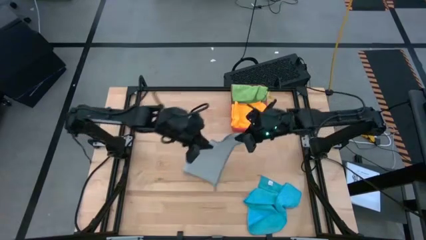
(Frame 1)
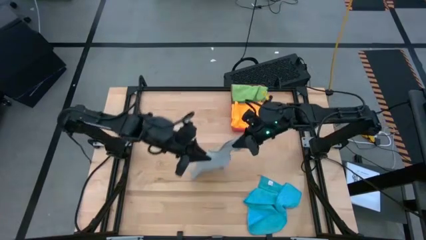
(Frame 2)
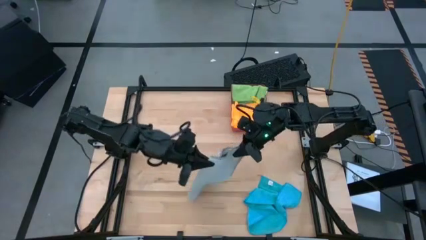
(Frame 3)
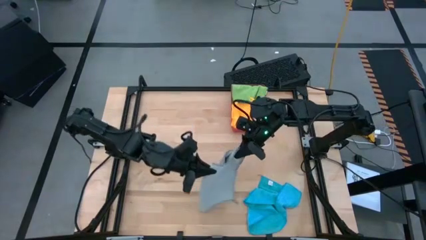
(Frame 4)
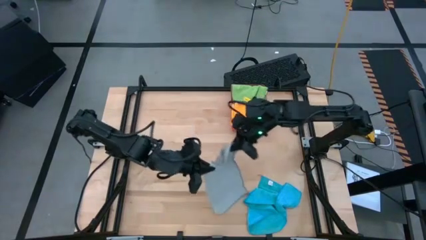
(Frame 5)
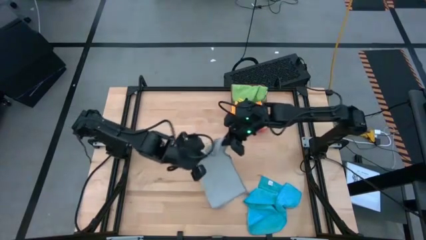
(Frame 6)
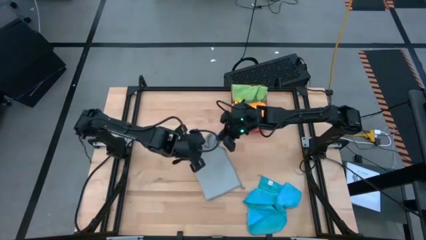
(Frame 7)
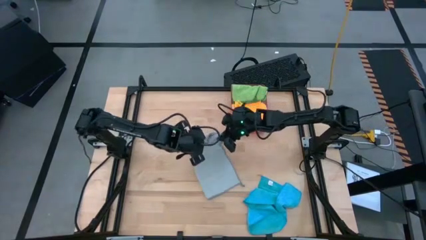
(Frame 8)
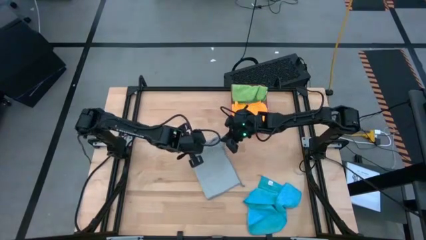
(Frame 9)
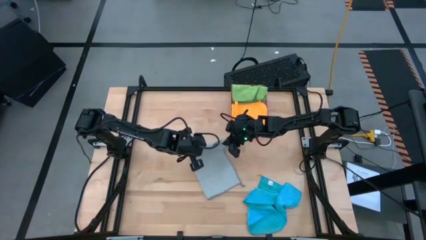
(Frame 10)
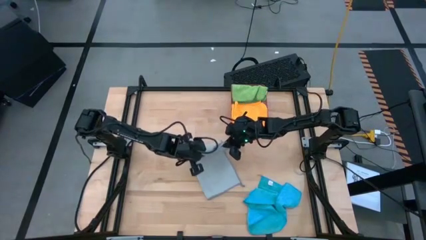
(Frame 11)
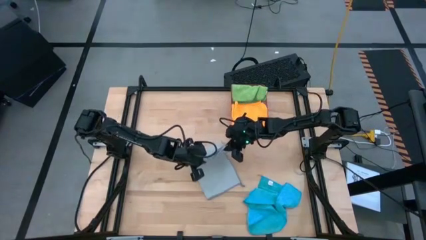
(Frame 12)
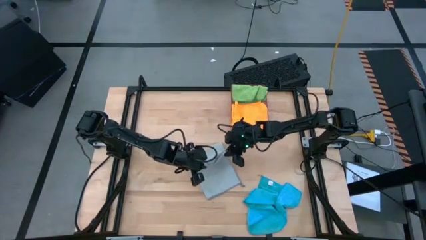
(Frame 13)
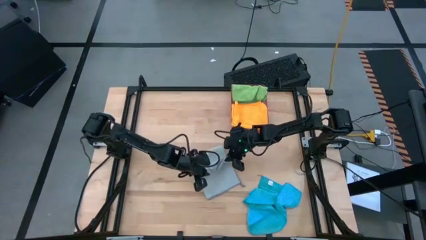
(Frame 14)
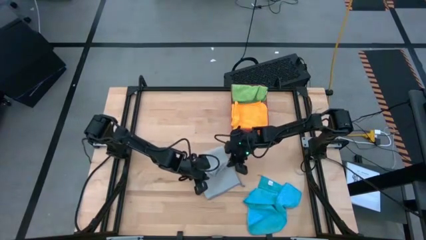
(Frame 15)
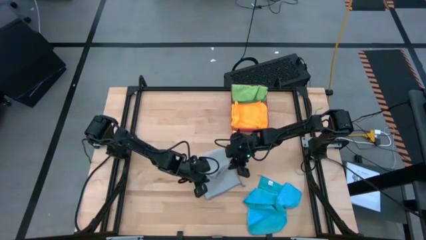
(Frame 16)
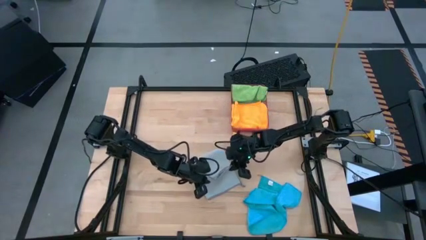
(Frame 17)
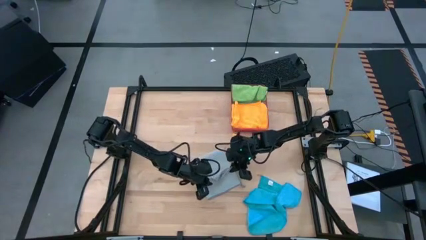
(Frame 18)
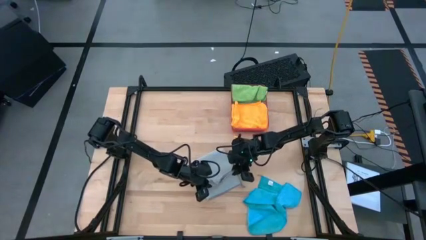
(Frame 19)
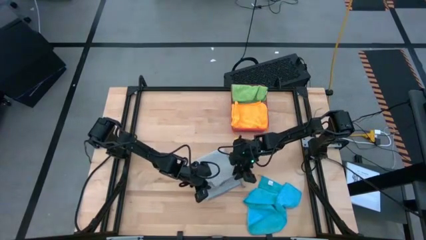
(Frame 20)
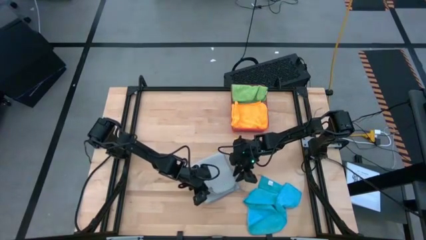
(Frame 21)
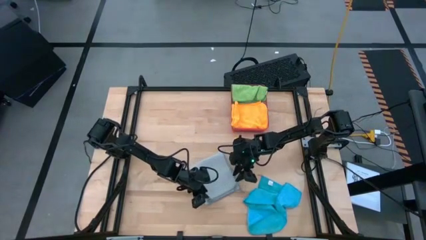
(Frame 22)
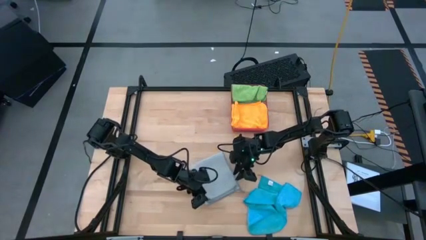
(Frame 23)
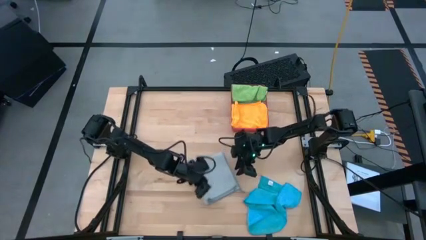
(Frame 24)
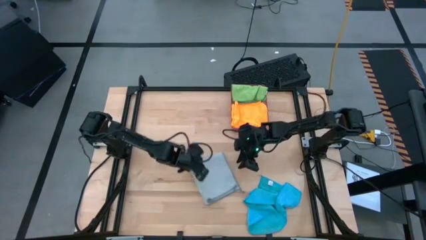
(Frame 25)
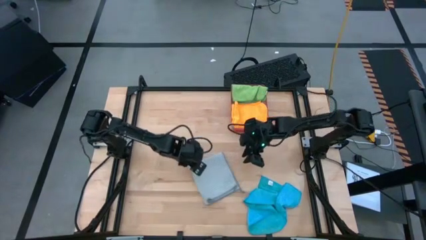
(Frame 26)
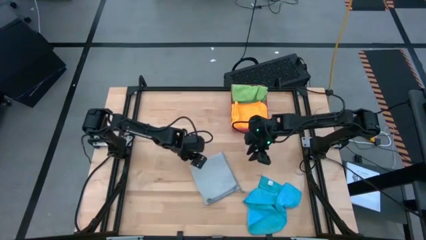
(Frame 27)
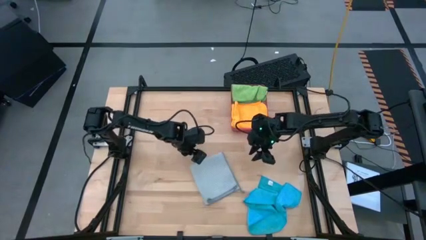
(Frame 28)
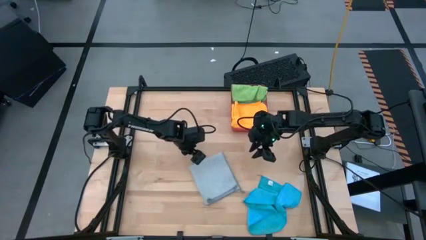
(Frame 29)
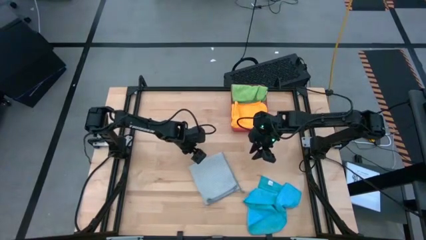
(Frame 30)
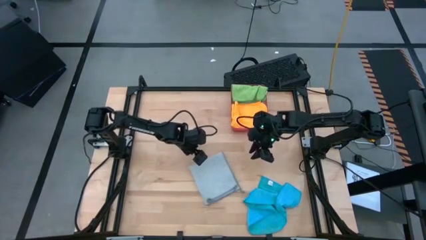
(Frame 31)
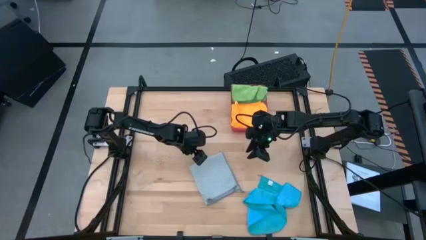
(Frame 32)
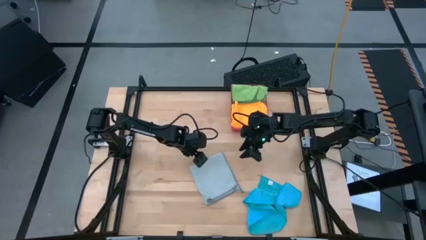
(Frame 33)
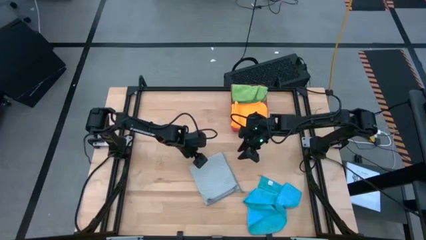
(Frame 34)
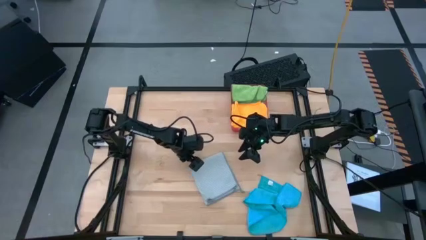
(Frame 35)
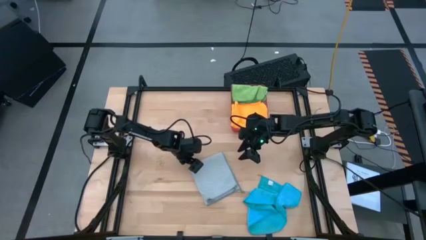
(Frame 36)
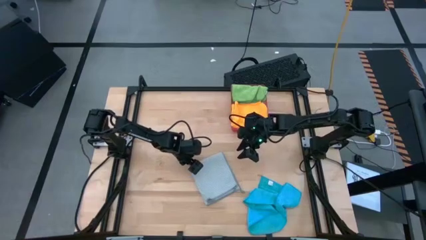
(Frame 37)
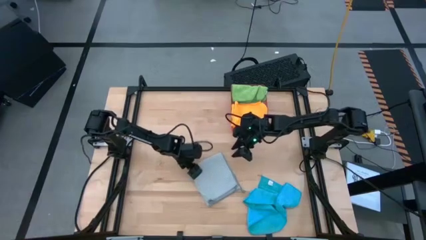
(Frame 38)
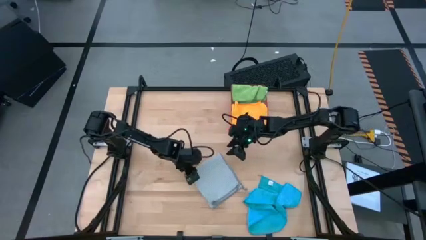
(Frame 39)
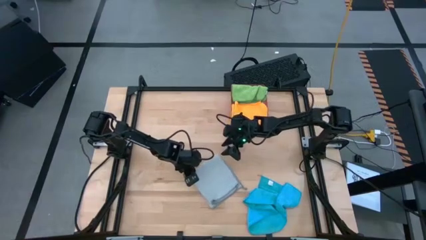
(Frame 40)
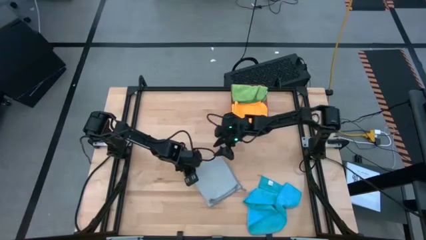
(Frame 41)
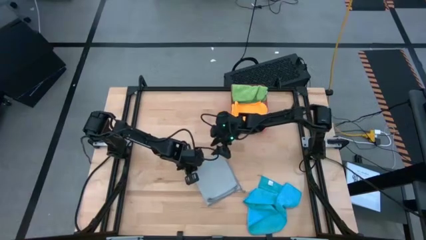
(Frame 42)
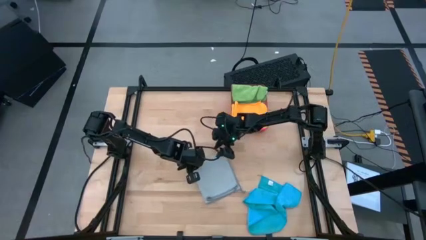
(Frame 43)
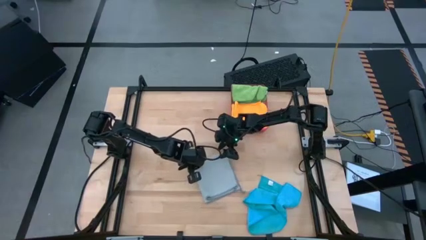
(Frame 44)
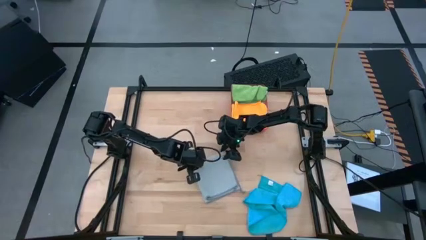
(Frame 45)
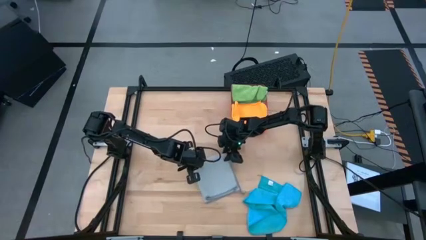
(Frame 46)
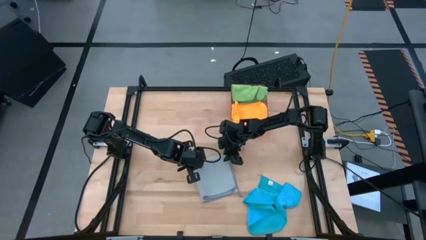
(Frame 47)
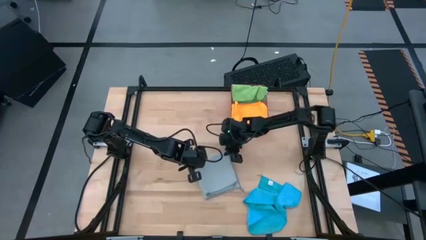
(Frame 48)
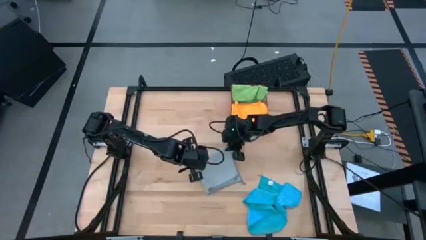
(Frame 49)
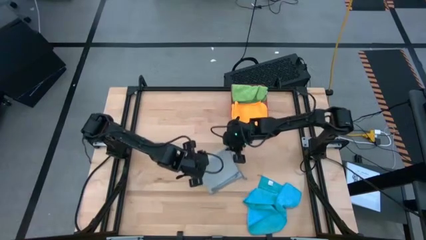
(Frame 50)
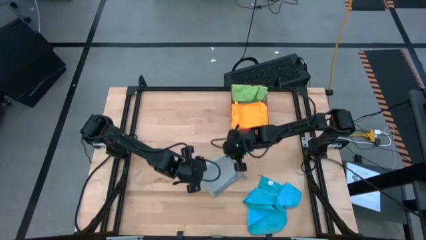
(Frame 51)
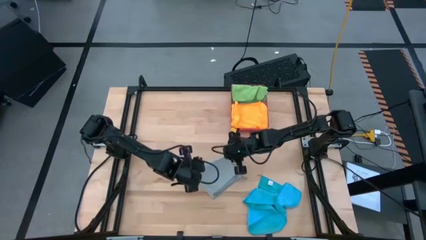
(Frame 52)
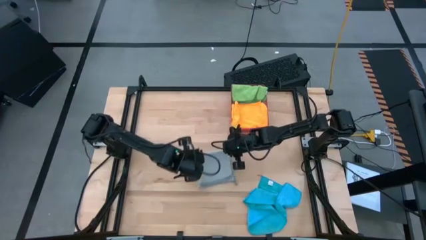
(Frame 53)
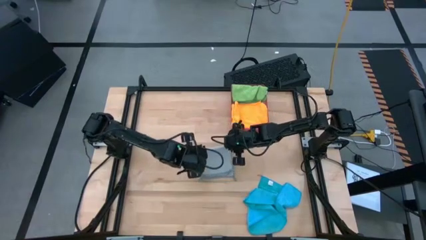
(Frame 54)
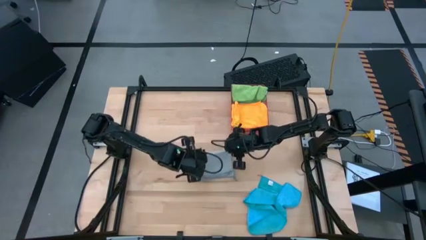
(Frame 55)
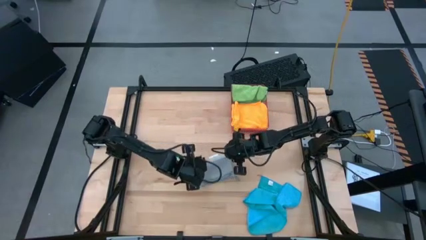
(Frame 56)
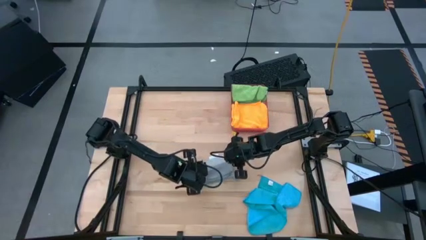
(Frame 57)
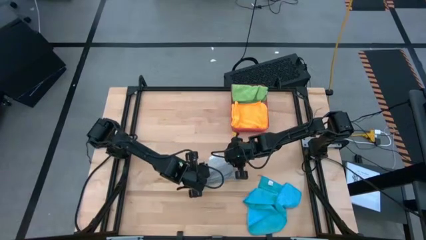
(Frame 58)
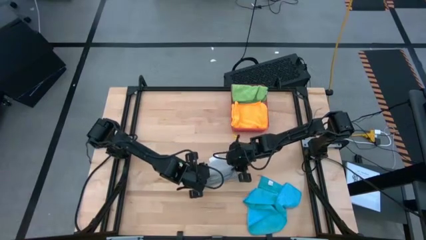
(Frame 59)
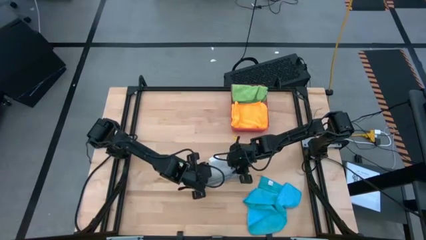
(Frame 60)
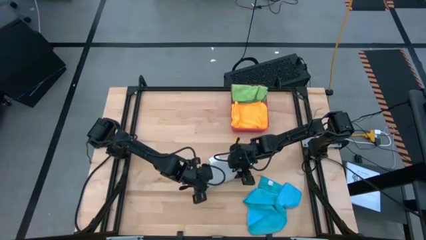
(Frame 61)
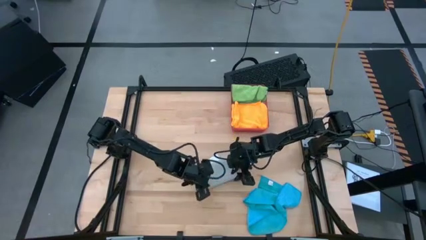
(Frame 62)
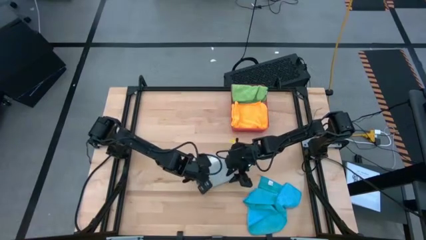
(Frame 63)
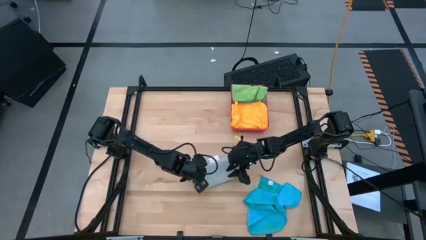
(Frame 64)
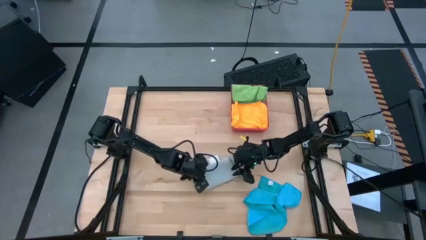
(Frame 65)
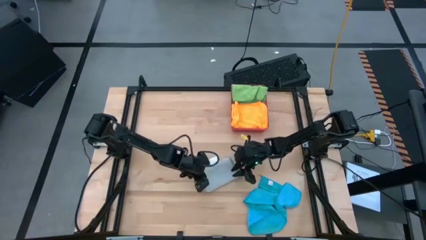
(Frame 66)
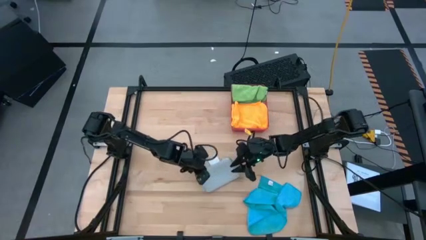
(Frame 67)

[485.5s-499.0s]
Task: Fold microfiber towels
Fold the gray microfiber cloth

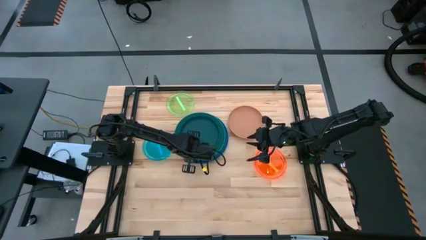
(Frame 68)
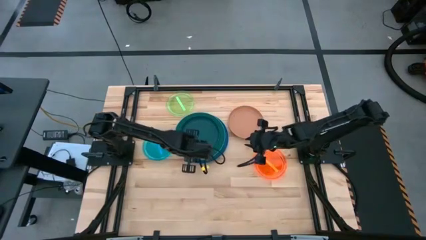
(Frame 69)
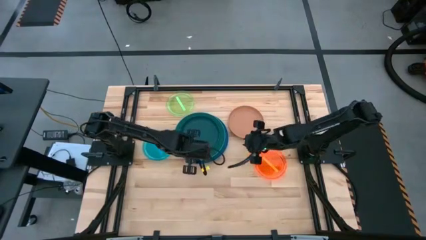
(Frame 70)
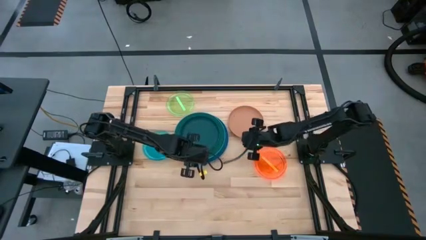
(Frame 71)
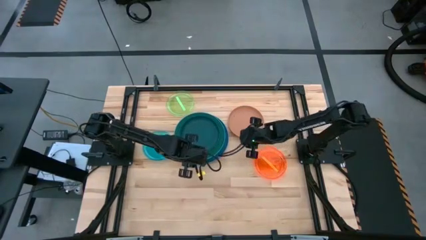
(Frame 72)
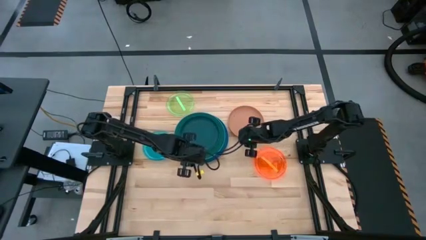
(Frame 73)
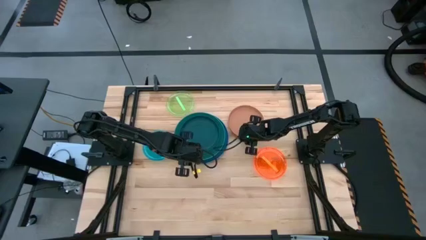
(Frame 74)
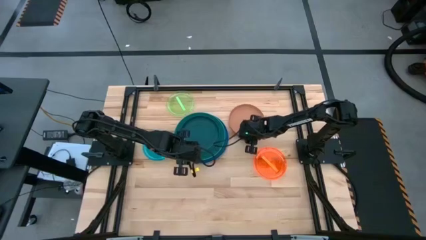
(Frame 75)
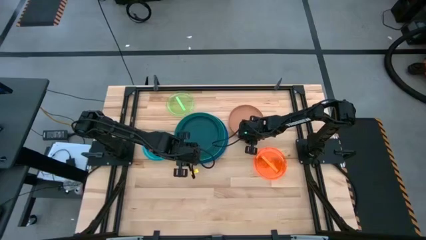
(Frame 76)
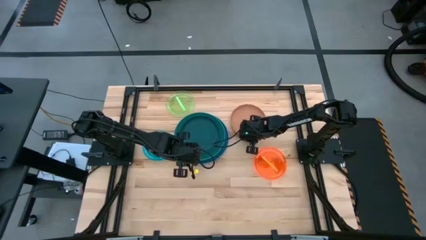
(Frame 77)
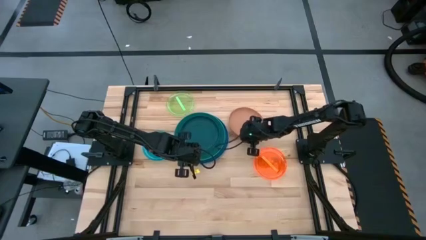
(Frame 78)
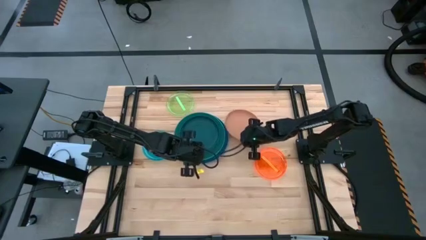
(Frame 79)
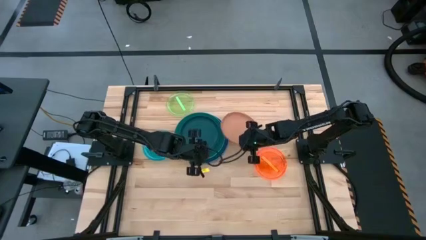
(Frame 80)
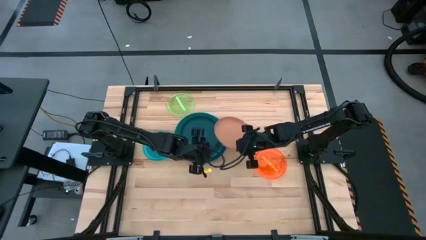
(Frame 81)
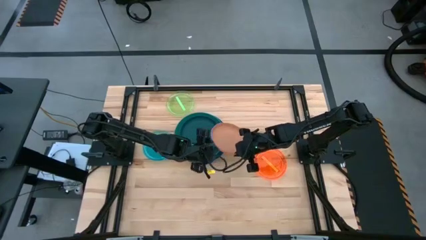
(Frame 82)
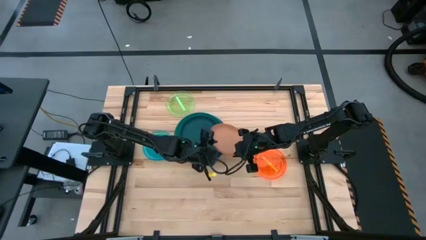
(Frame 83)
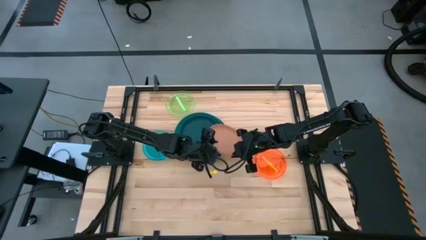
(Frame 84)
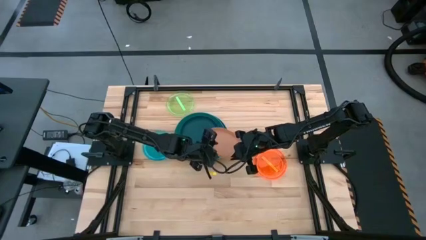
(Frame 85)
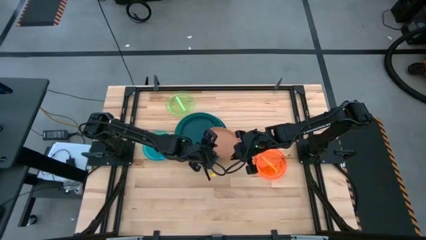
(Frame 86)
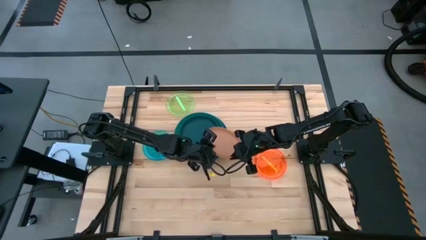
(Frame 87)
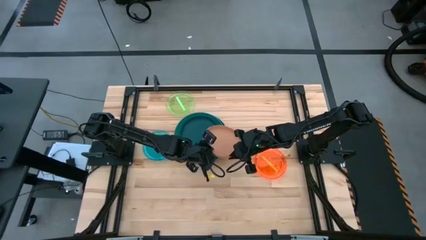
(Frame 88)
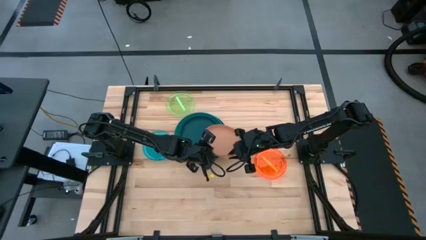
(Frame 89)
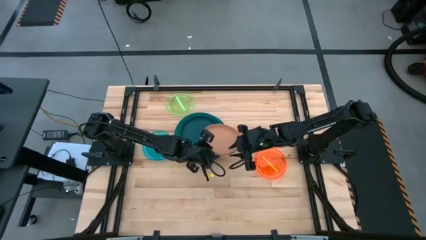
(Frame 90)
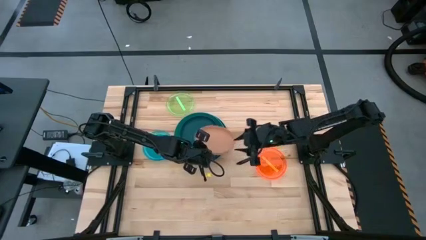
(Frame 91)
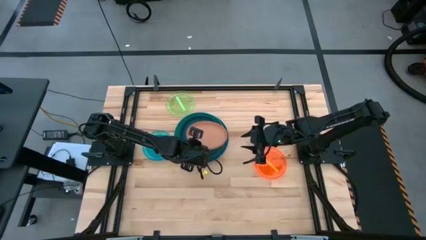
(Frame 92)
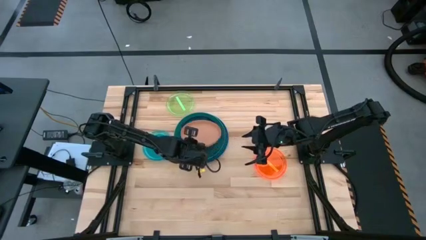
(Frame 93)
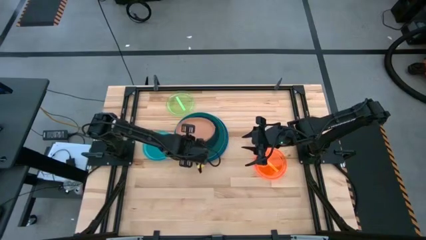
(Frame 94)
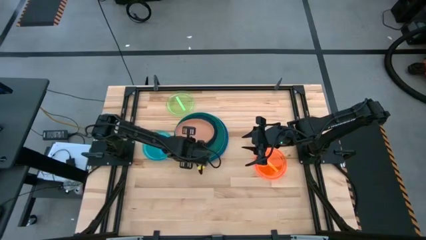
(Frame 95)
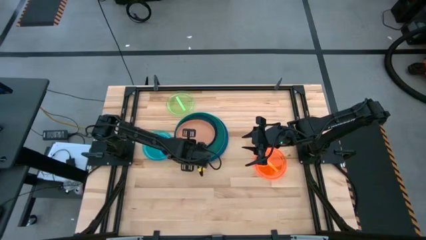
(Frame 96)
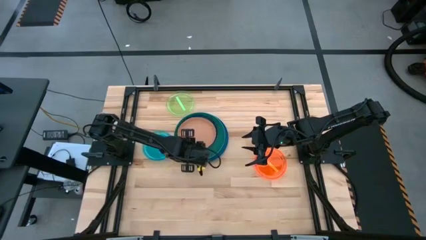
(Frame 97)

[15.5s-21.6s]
Task: Stack plastic plates
Stack the pink plate on top of the dark green plate
